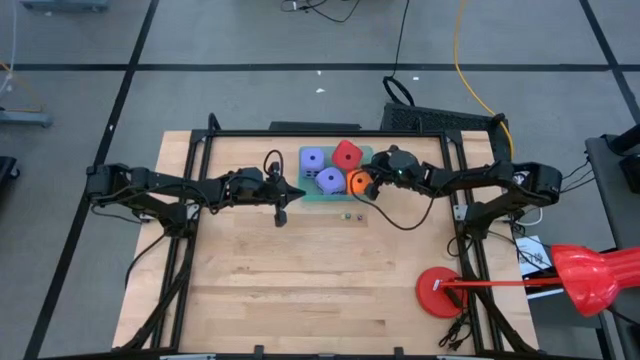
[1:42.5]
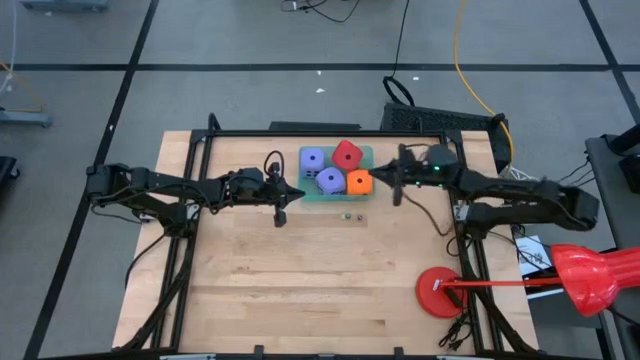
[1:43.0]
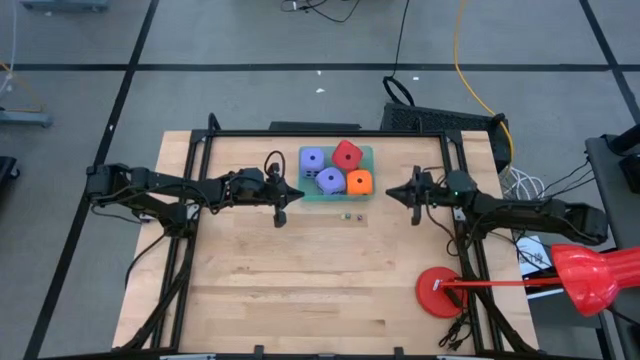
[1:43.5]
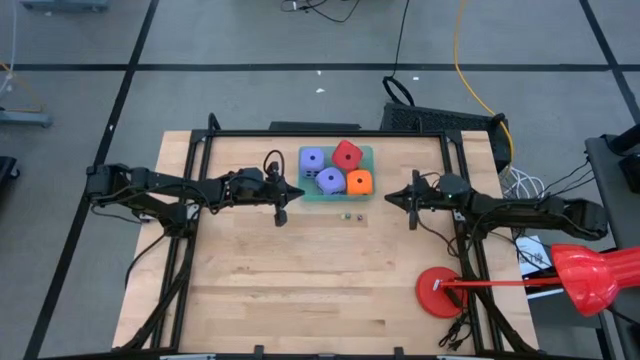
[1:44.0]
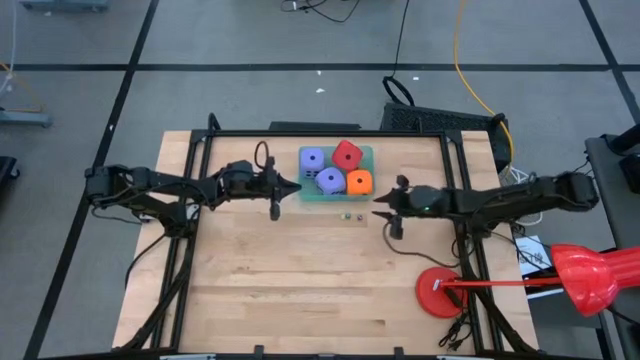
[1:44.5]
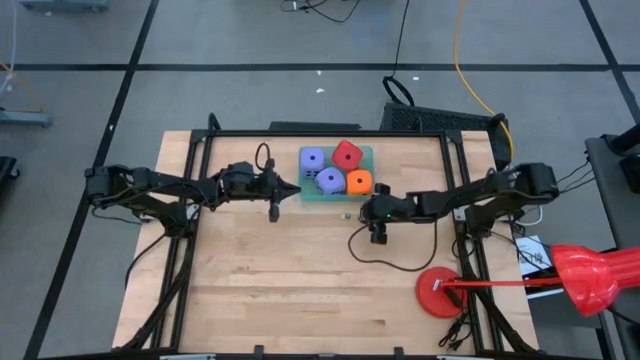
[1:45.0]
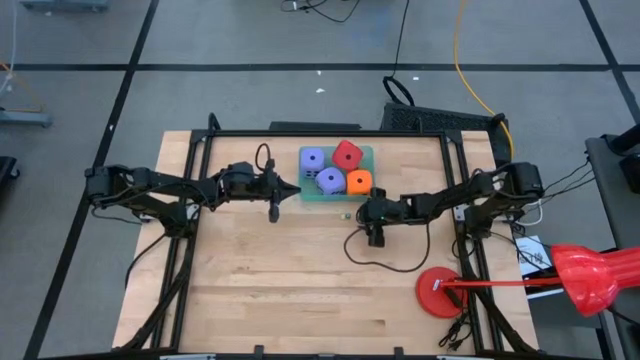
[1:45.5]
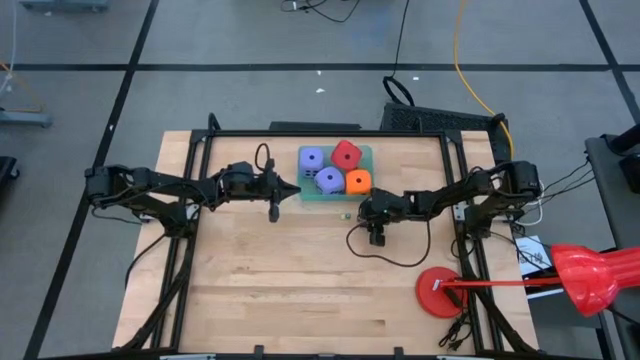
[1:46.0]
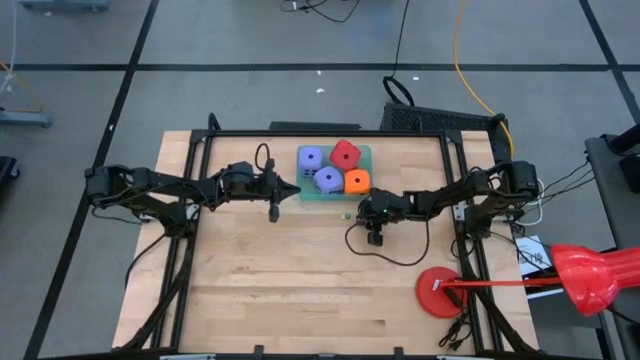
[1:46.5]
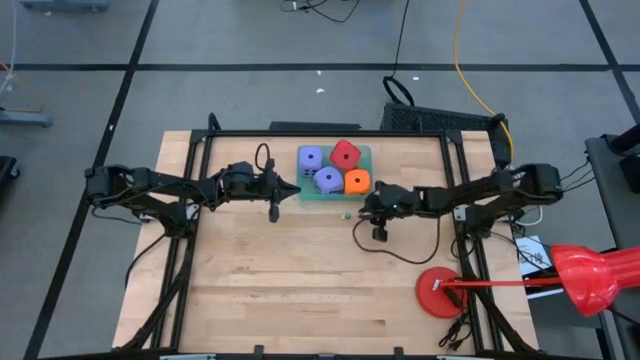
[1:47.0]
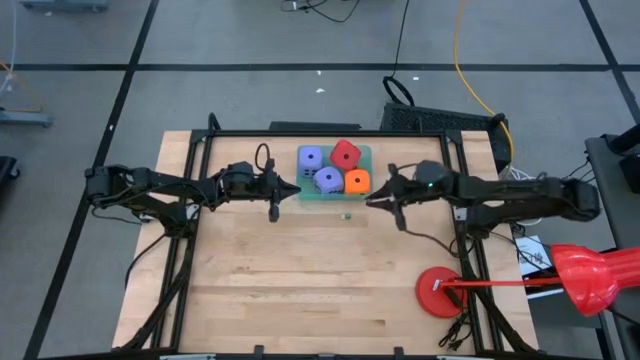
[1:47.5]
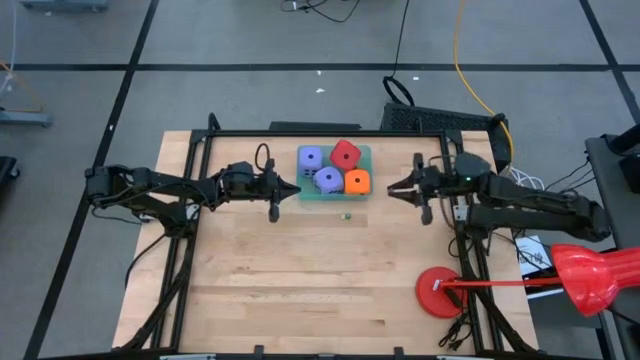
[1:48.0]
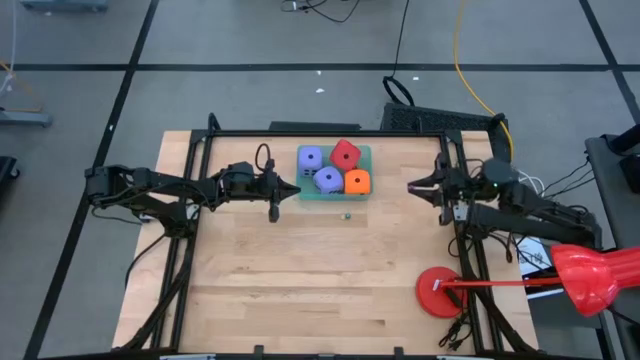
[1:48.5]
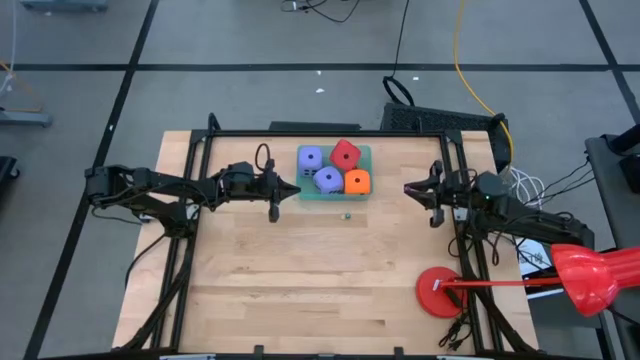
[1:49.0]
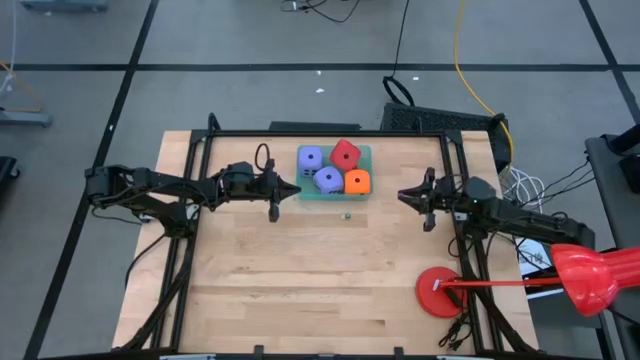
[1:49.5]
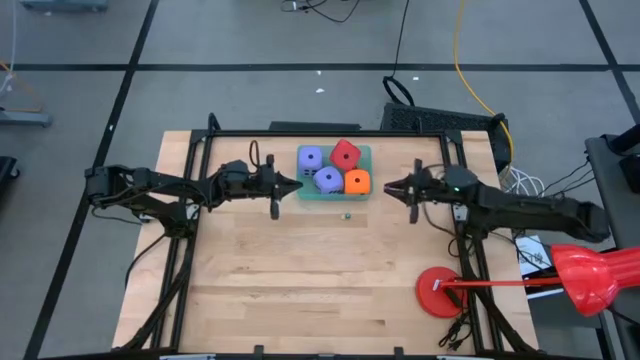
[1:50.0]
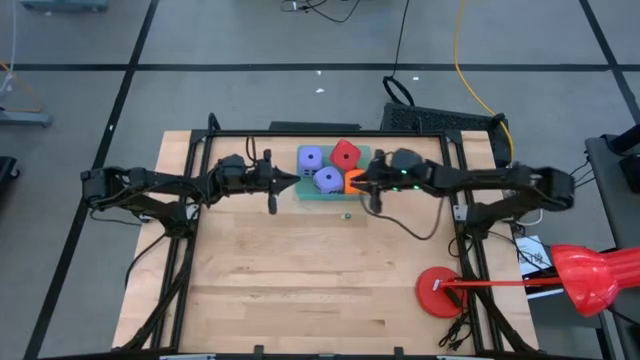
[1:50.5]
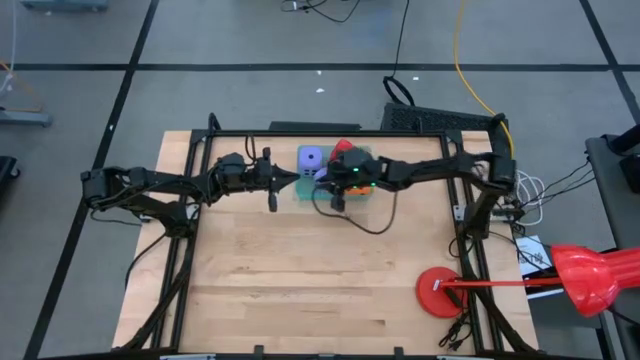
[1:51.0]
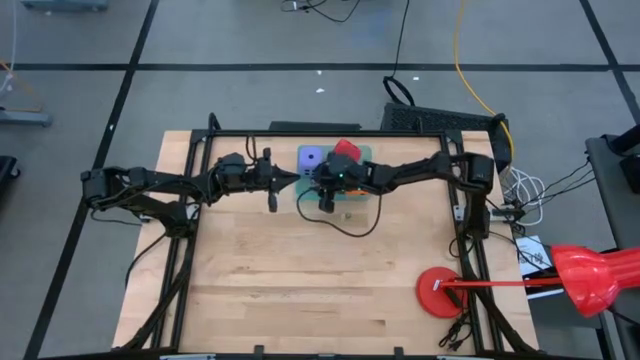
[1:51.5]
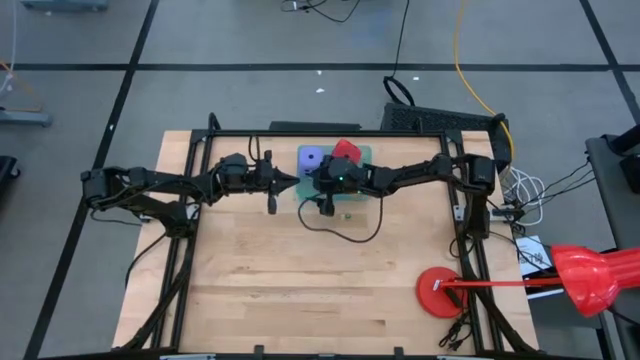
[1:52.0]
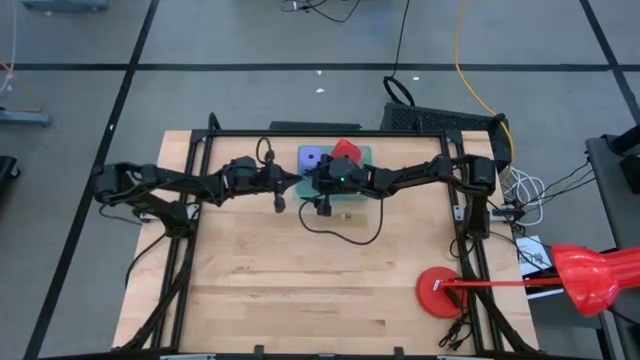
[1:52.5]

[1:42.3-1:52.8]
Task: Pick & Place Dice
Put the small purple dice into the basket

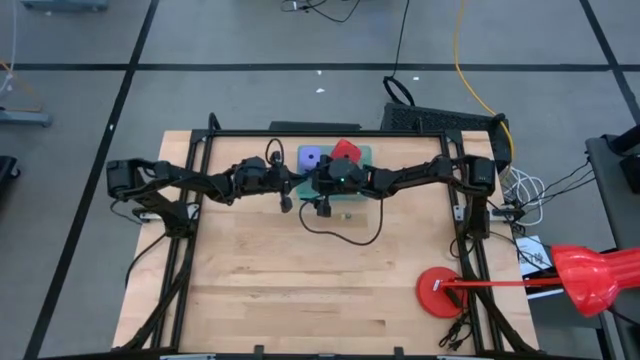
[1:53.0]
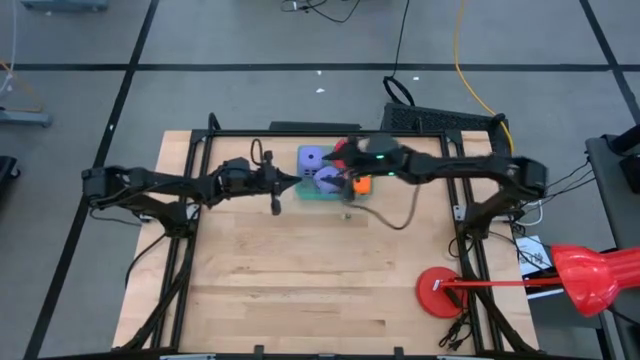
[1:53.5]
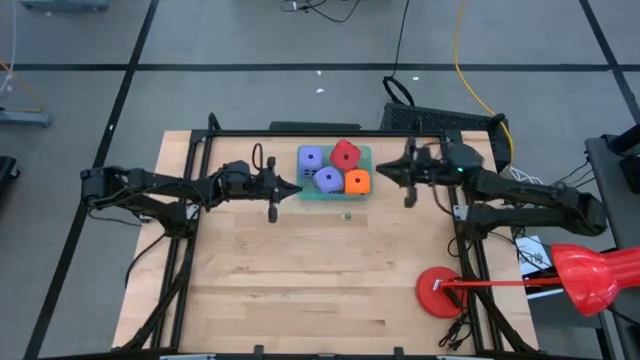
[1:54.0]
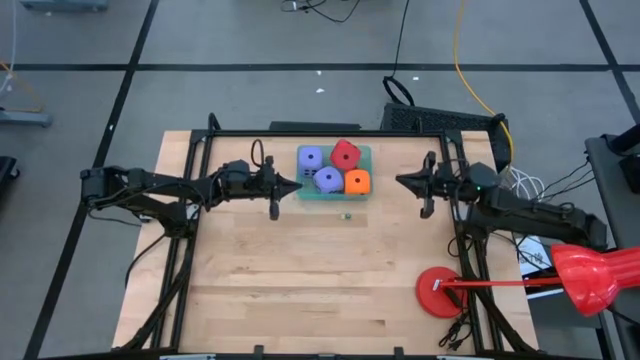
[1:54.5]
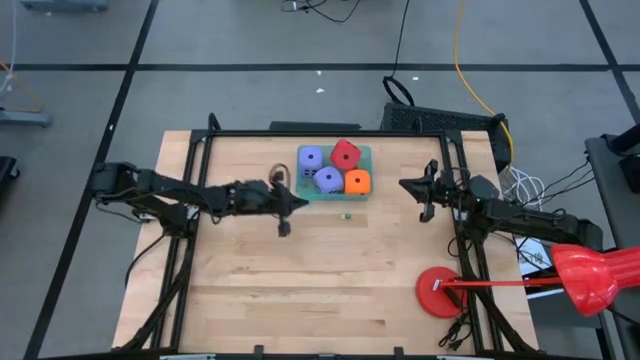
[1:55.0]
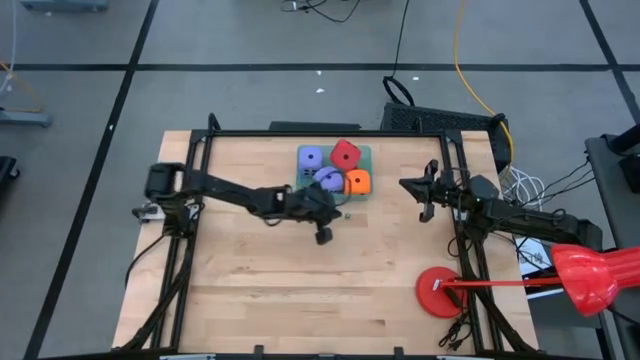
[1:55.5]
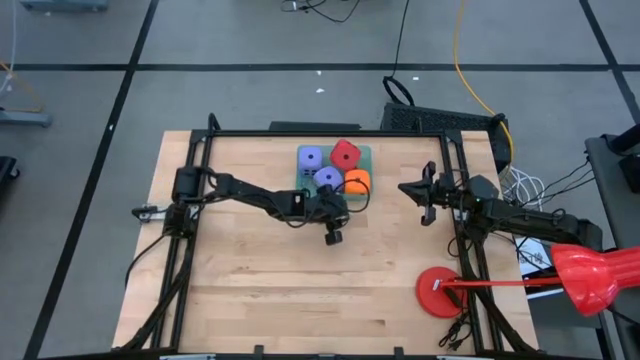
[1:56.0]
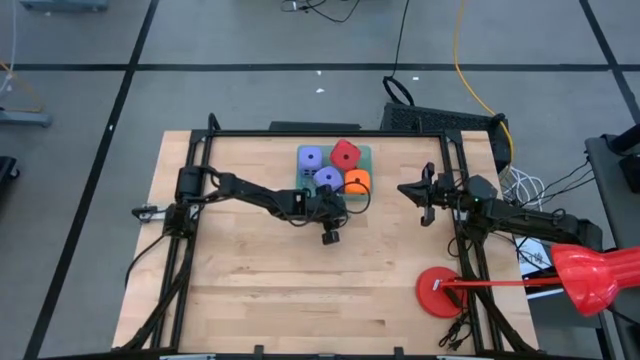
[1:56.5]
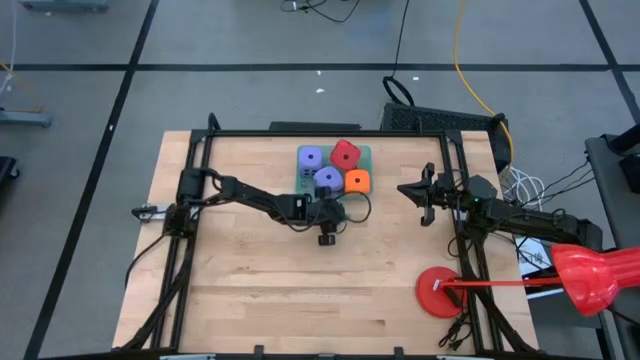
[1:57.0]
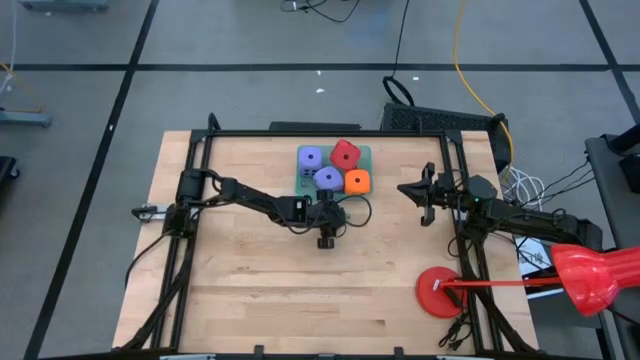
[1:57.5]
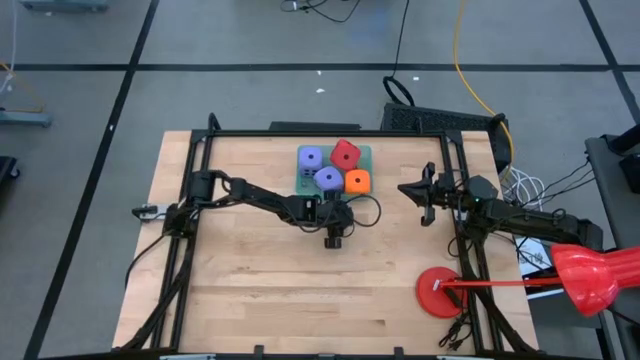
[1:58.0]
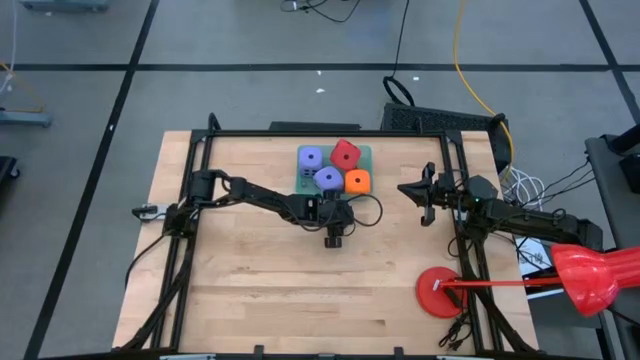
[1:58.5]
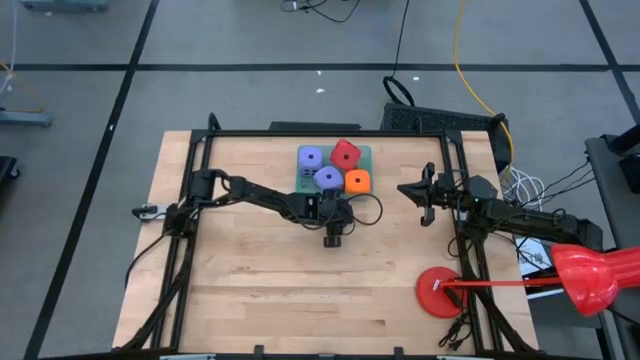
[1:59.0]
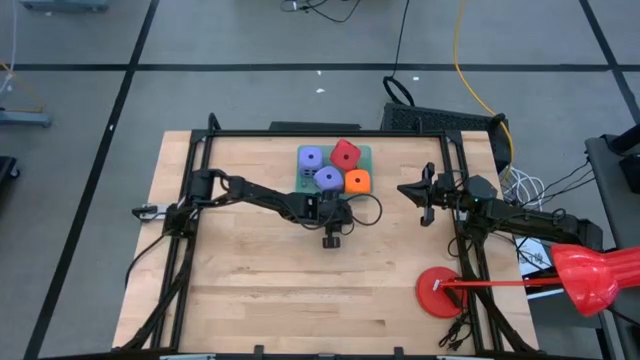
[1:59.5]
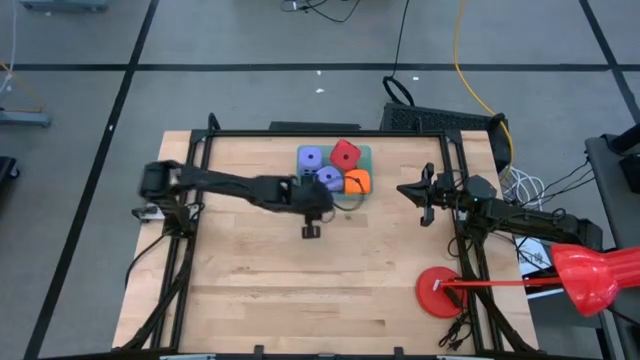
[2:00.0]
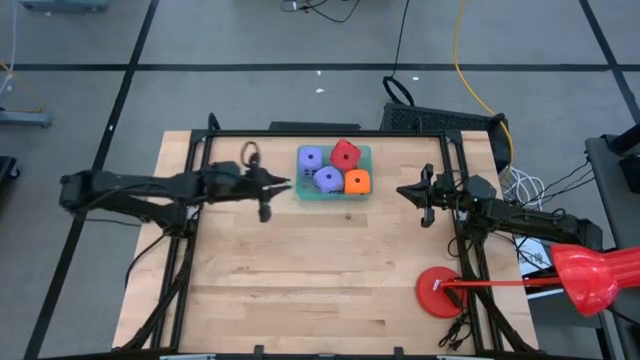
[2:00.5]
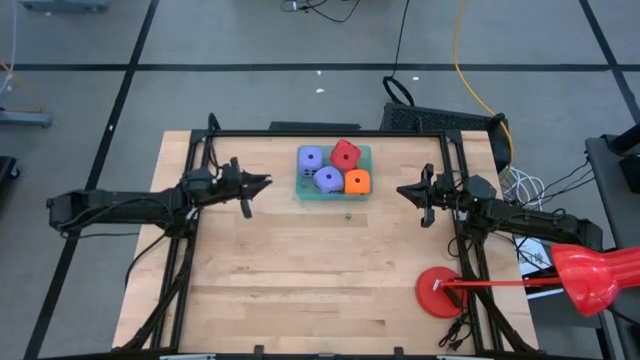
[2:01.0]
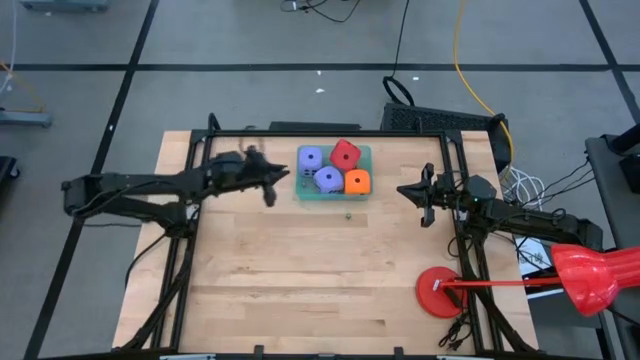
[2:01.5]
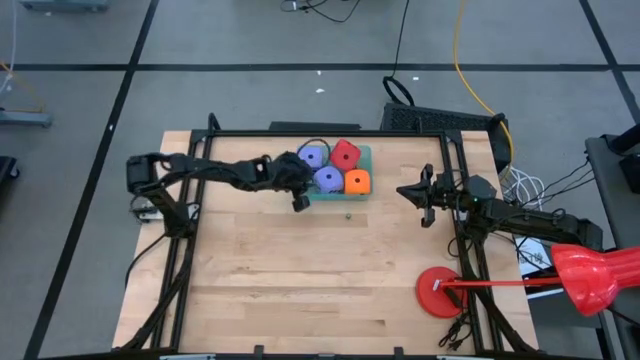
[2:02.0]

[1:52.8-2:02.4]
Put the small yellow dice into the basket

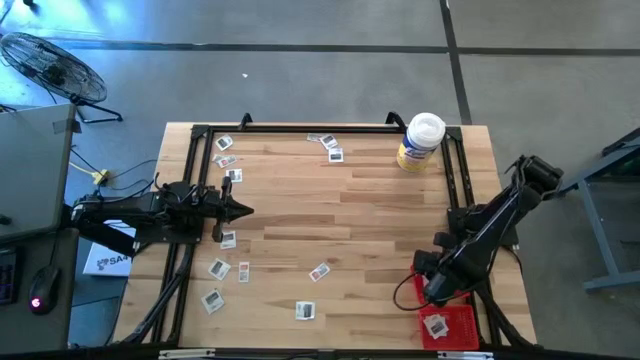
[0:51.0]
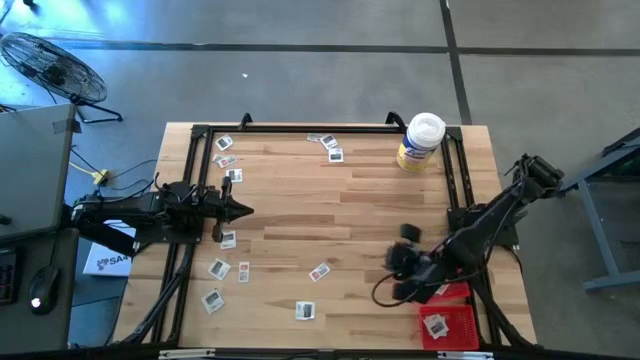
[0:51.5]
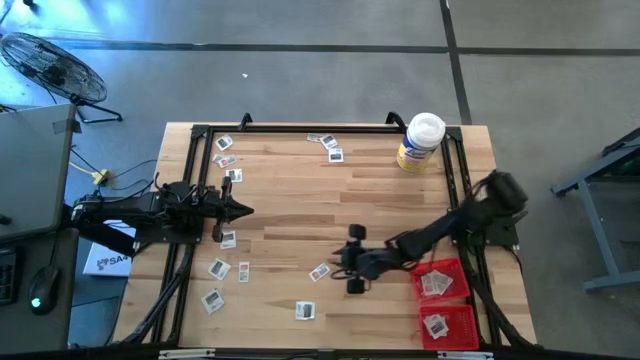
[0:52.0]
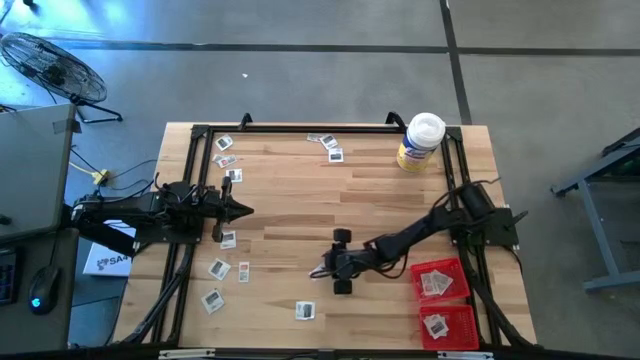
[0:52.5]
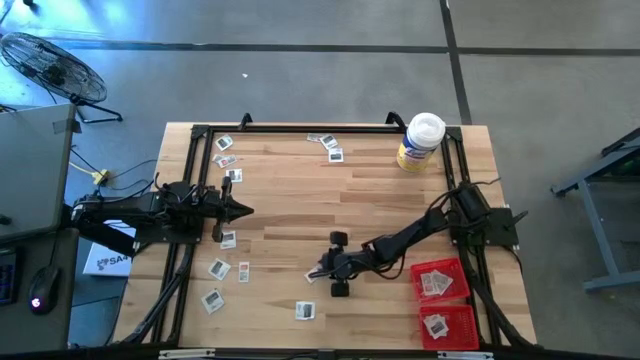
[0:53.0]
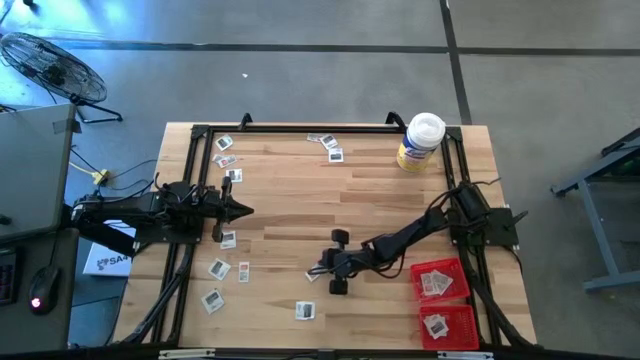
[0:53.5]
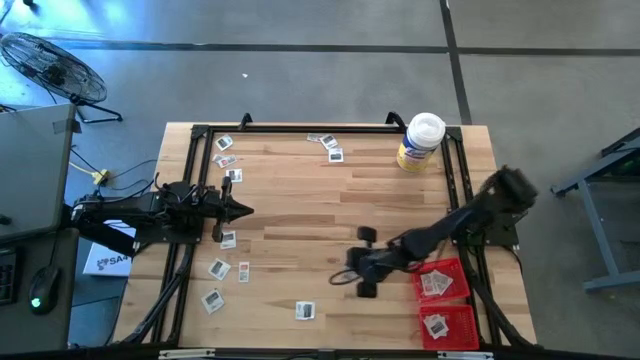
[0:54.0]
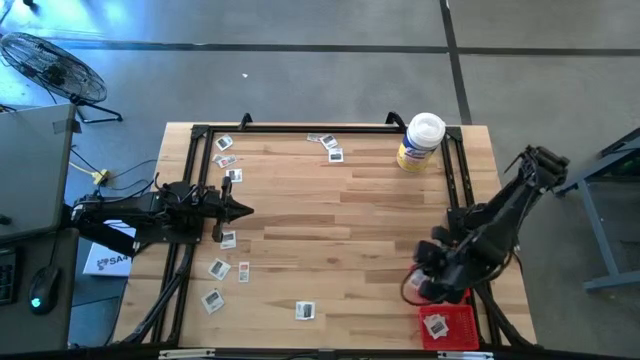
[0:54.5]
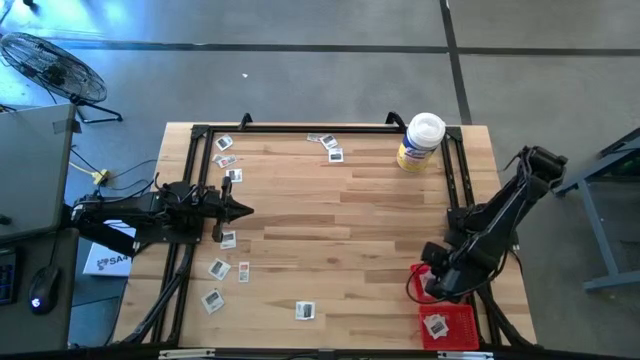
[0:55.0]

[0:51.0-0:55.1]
Task: Pick & Place First Aid Supplies
Put the white ointment pack into the top red bin
